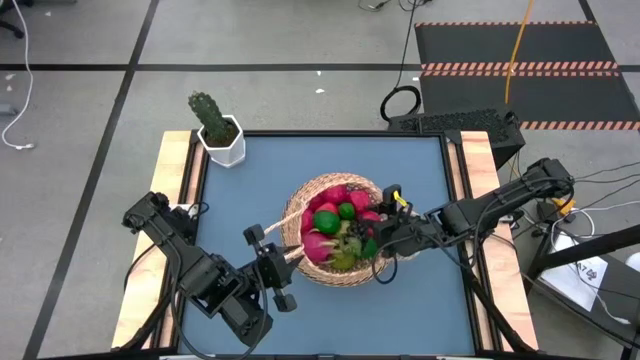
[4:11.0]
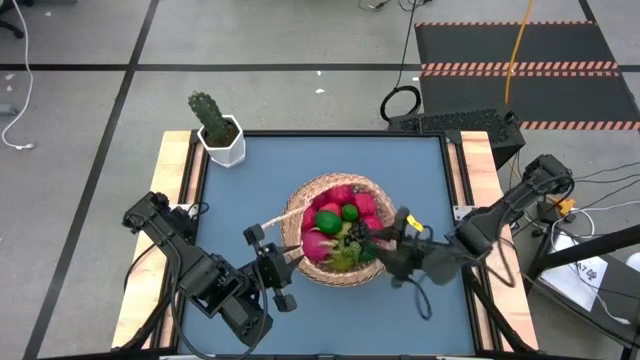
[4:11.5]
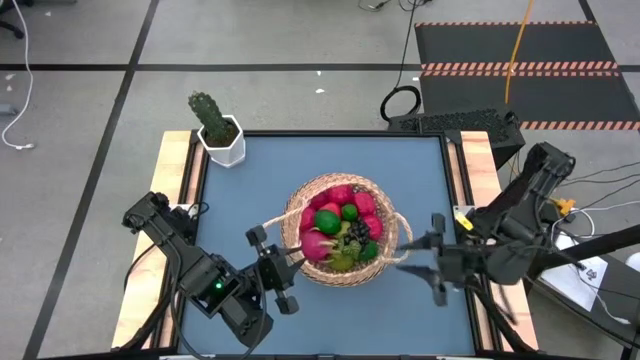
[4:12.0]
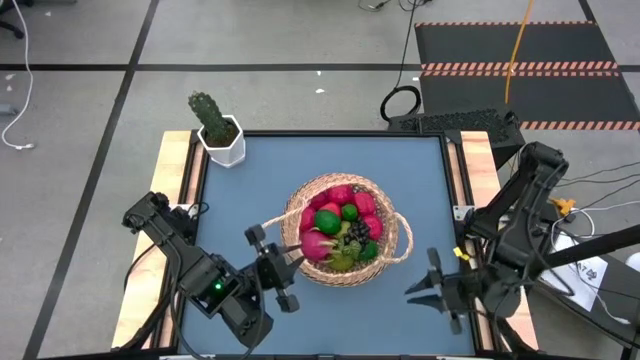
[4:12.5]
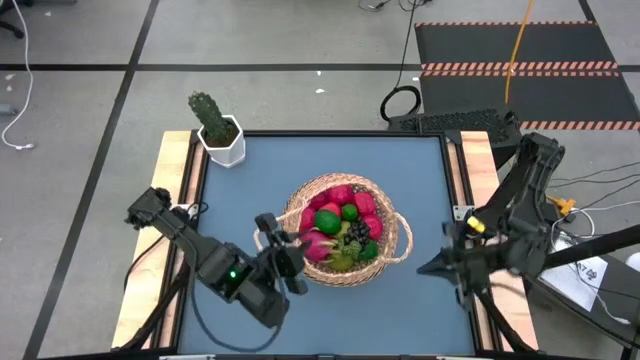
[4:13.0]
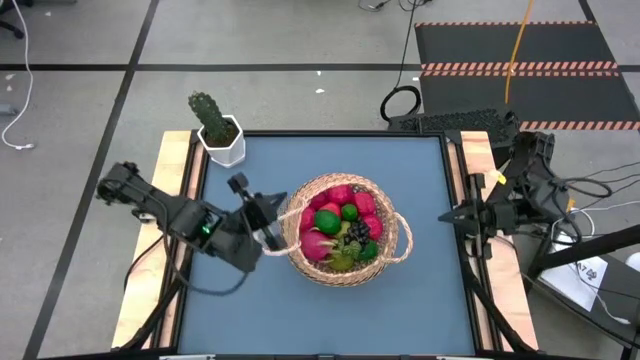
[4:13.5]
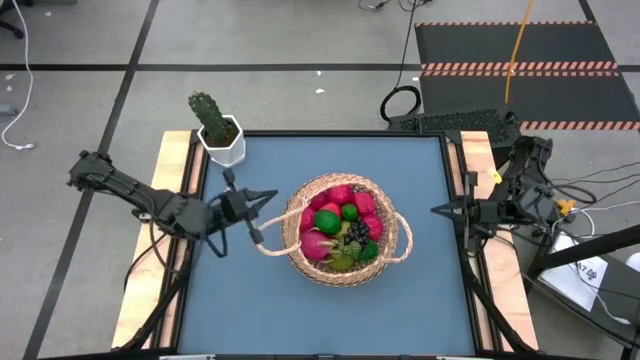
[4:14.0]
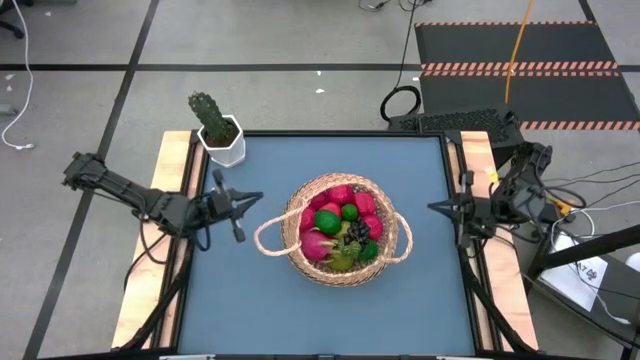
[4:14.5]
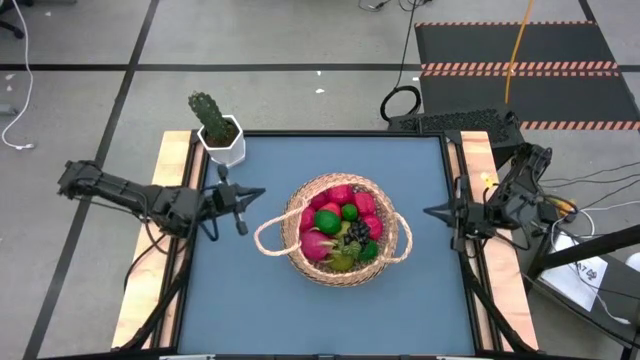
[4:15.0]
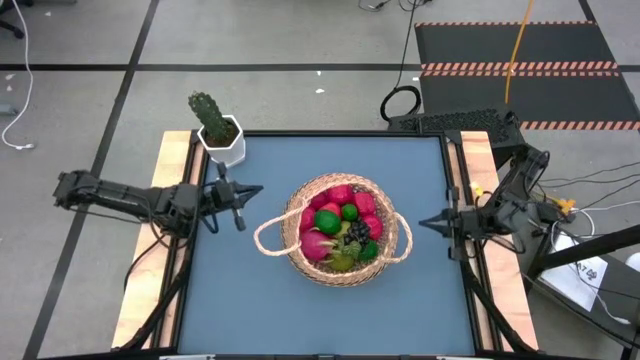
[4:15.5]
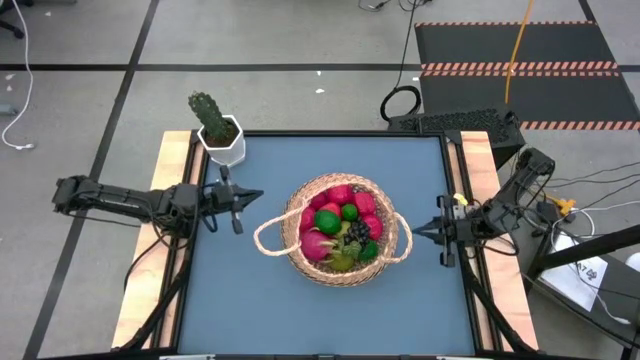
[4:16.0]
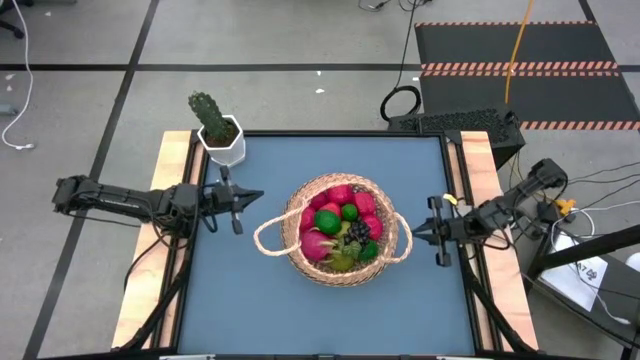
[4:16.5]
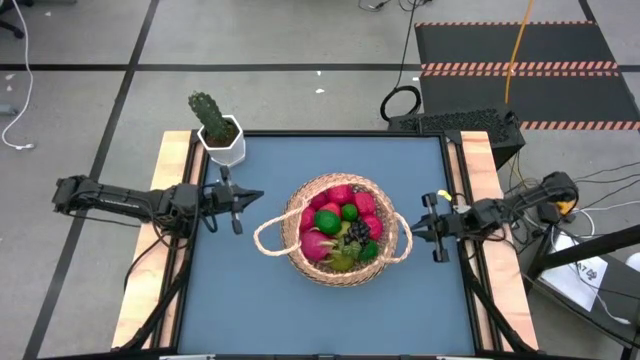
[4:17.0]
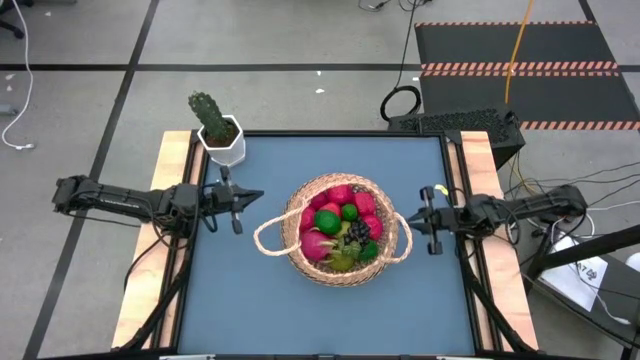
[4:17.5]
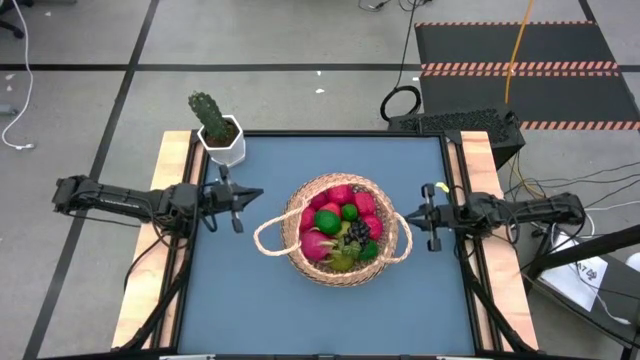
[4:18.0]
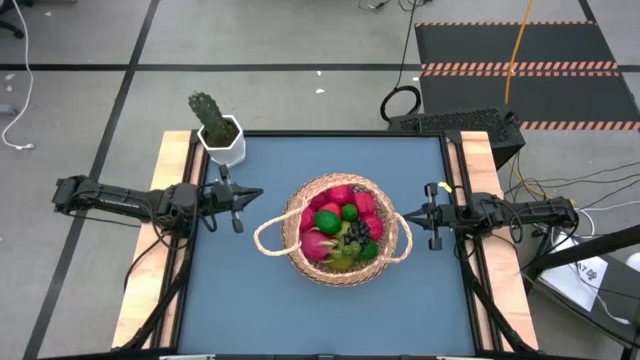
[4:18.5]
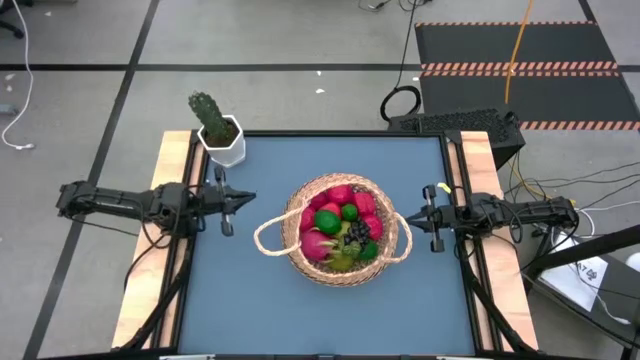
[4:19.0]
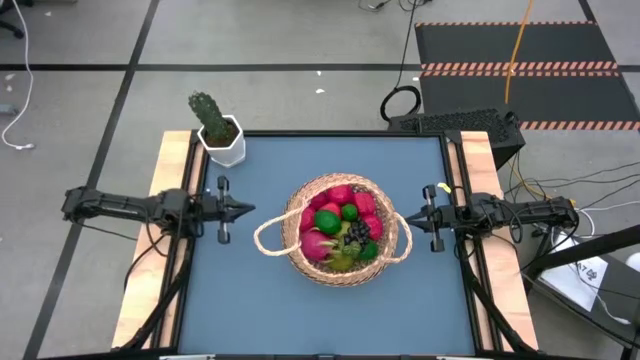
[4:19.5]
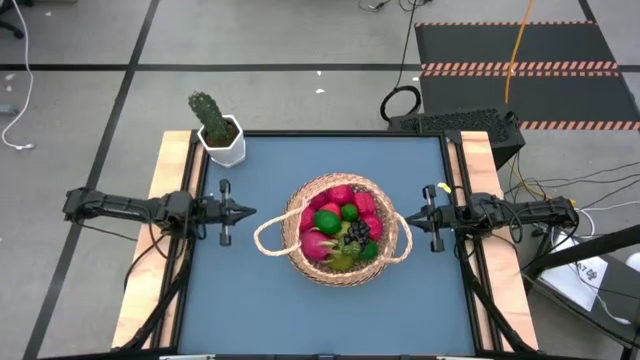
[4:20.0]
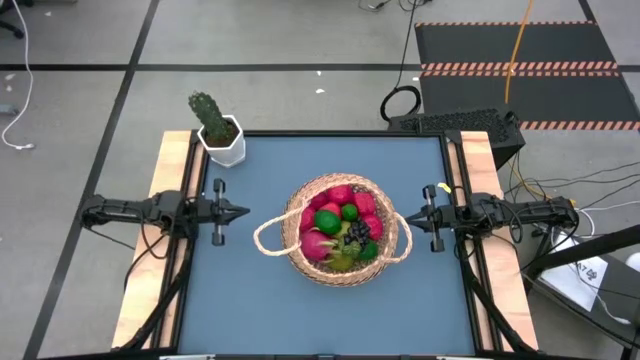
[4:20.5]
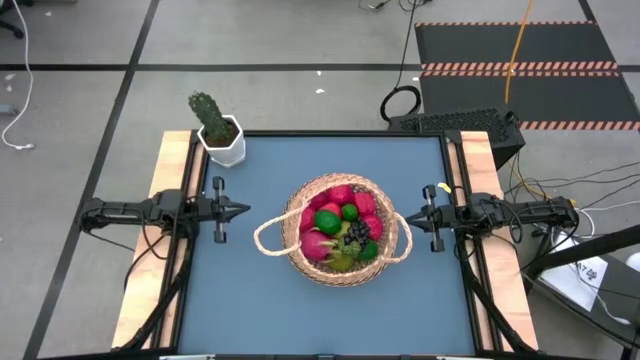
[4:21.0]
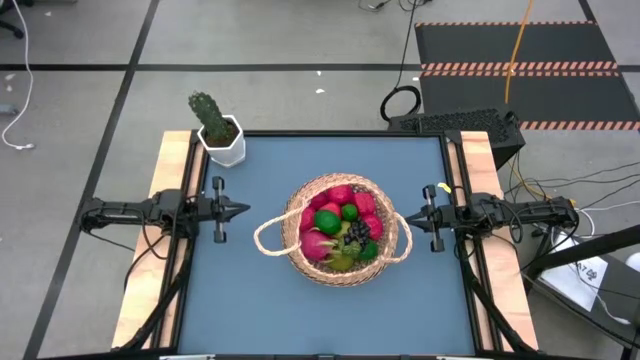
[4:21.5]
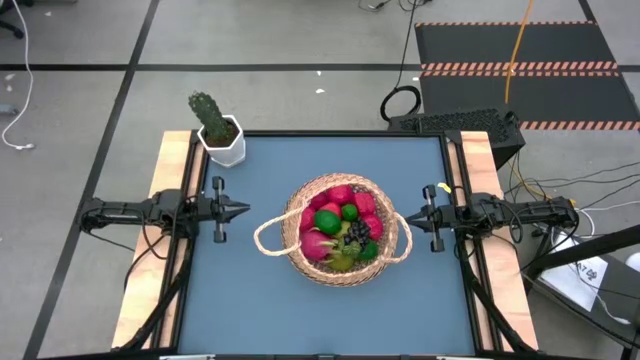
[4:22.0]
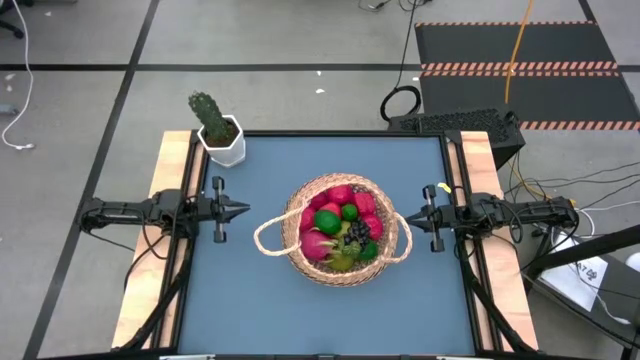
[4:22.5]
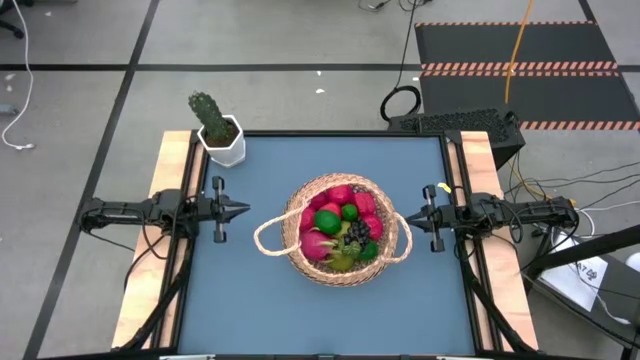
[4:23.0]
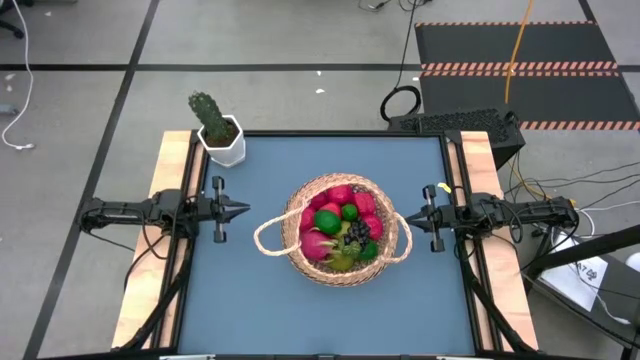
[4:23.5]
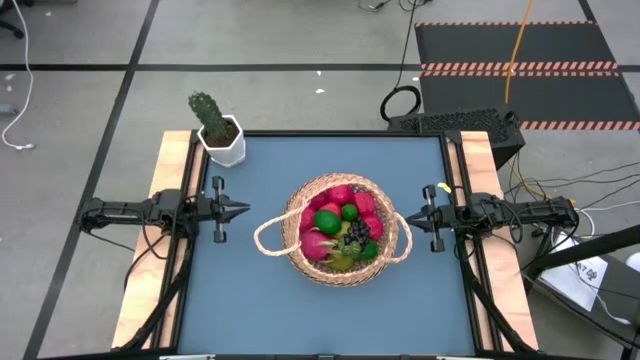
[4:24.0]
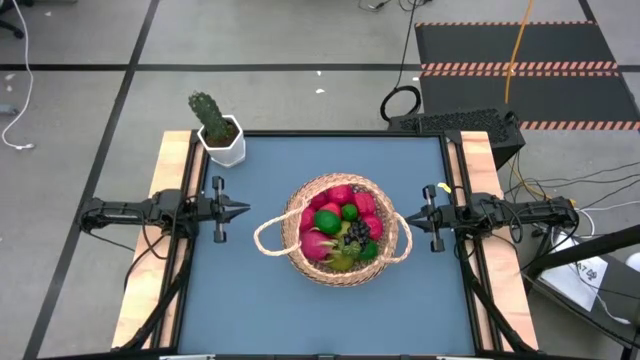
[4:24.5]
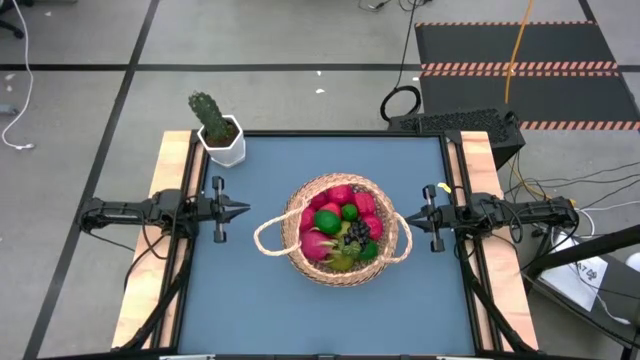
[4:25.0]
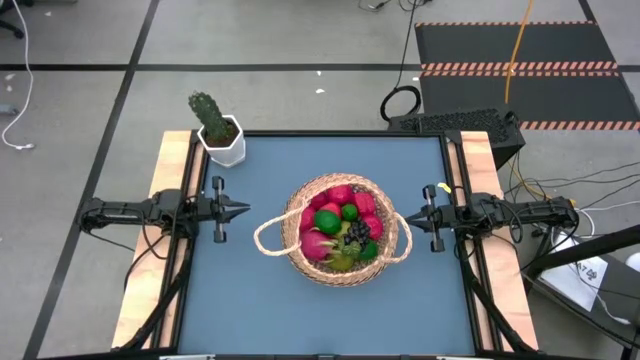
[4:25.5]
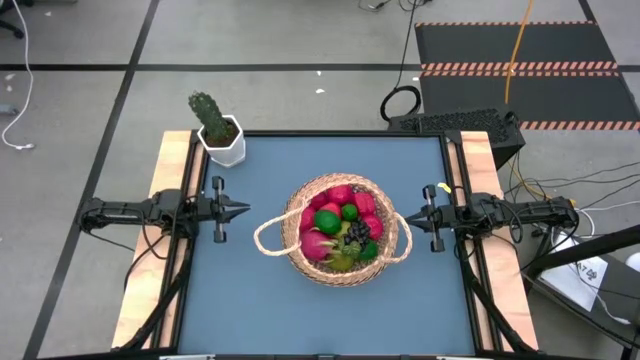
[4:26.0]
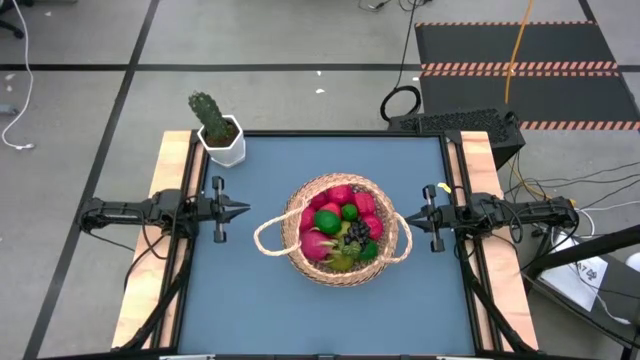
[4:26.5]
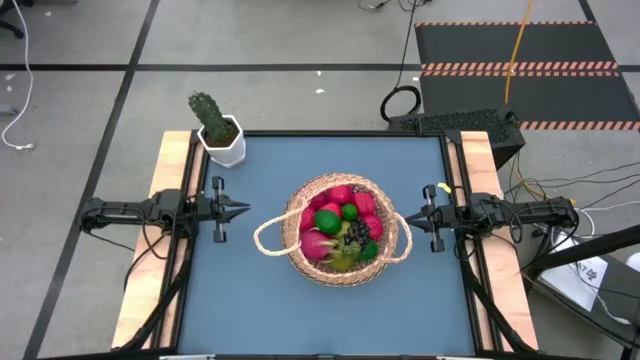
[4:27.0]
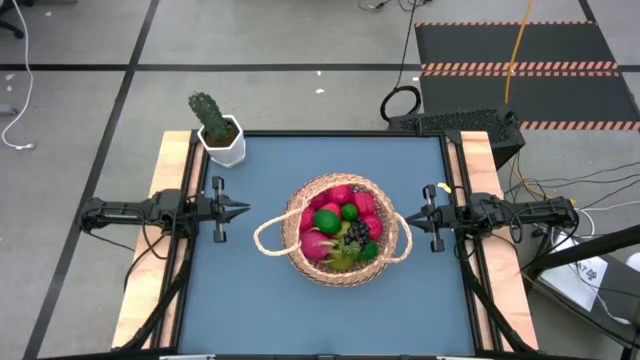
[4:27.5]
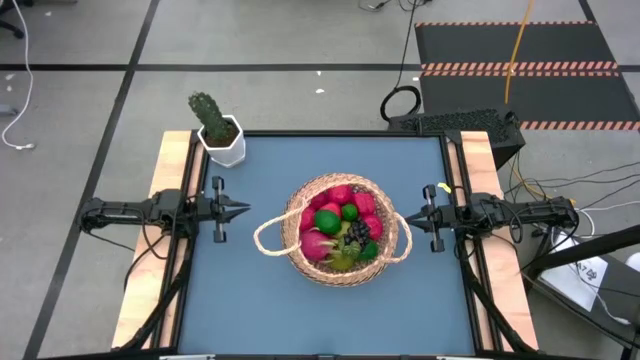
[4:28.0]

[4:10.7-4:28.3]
Task: Build produce basket
Return to Home Position

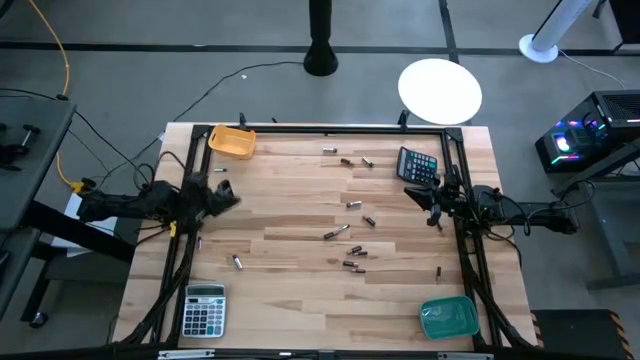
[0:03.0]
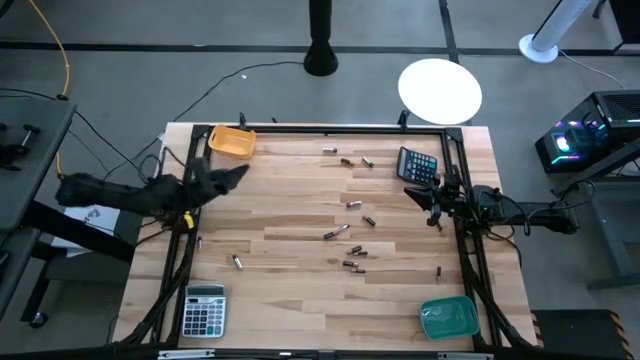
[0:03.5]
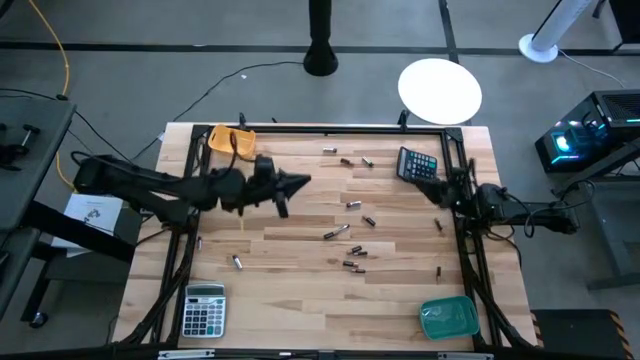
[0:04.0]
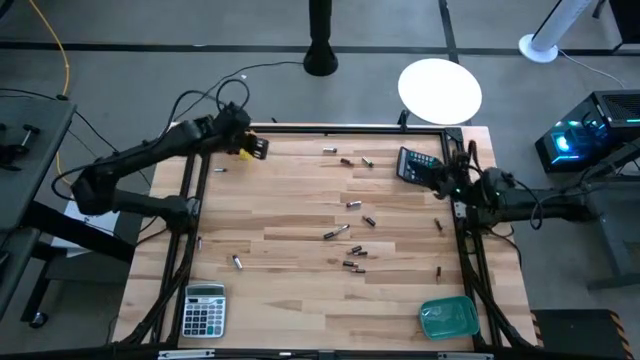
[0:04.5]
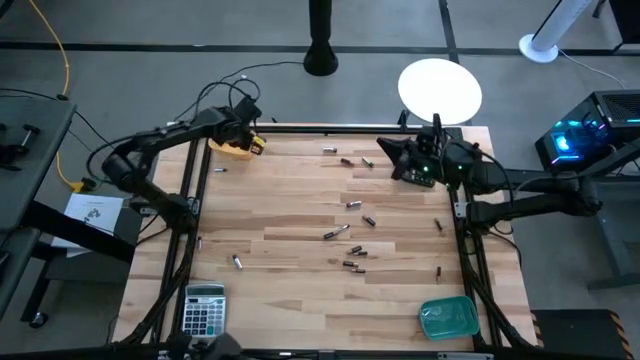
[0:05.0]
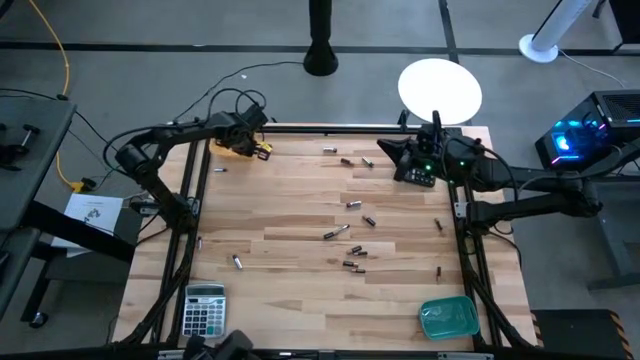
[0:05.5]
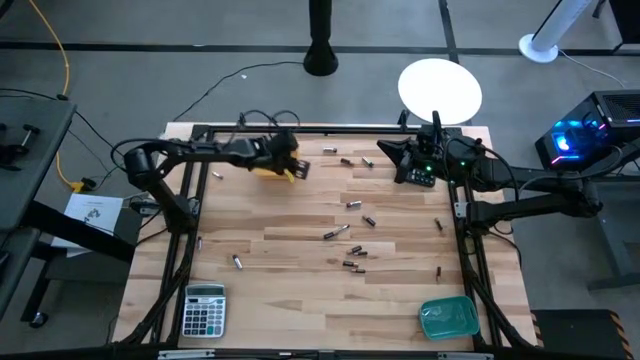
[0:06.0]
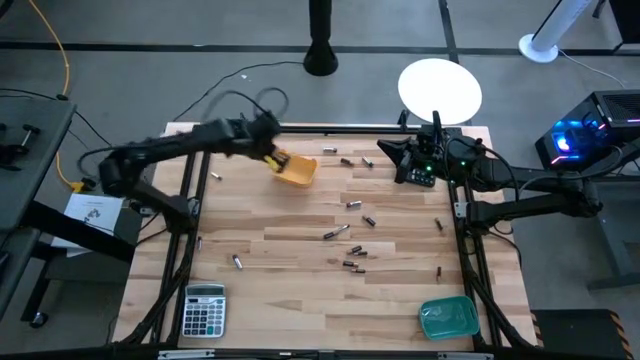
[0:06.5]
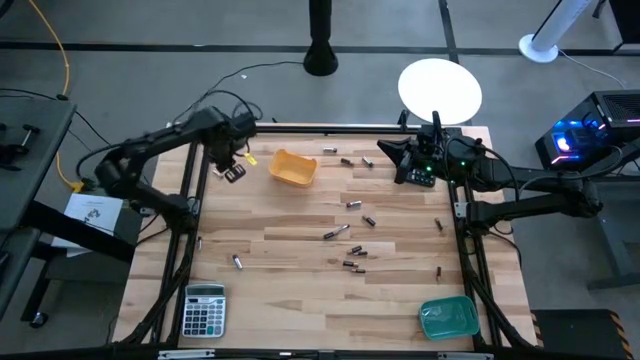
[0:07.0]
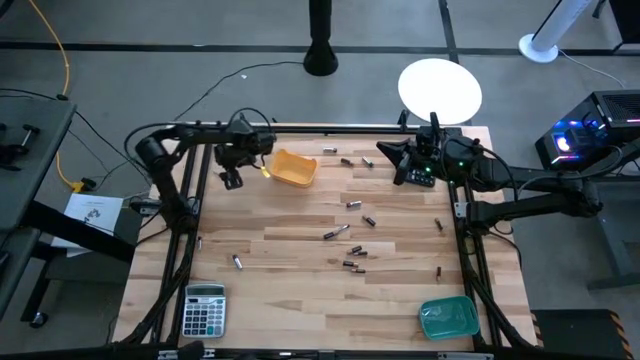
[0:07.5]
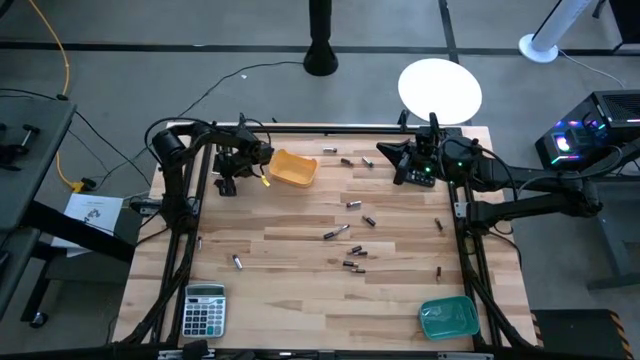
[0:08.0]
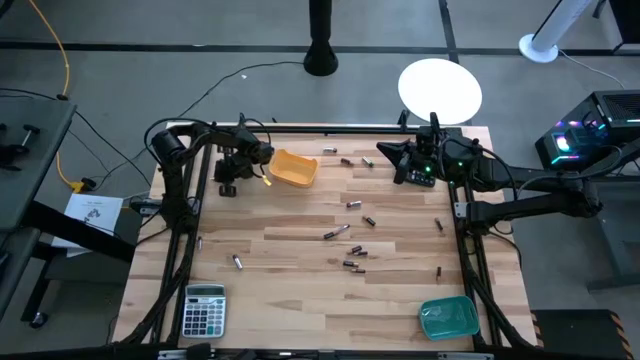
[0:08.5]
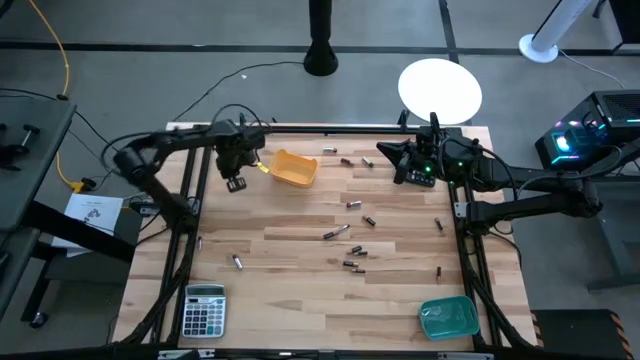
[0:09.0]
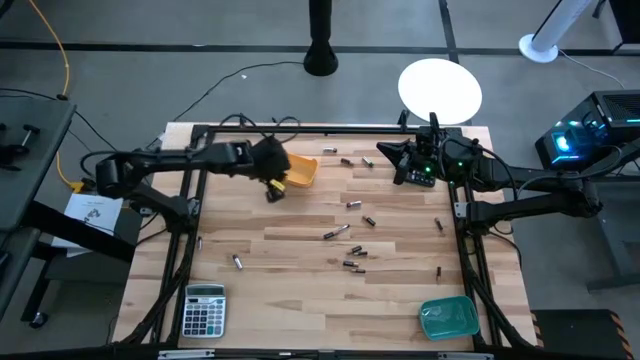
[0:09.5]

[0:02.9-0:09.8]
Task: Sort batteries
Put the silver battery into the yellow bin
